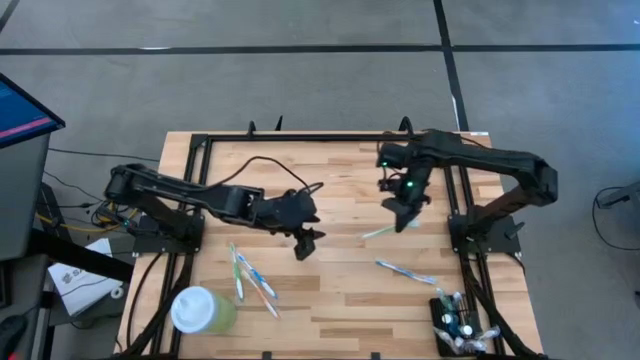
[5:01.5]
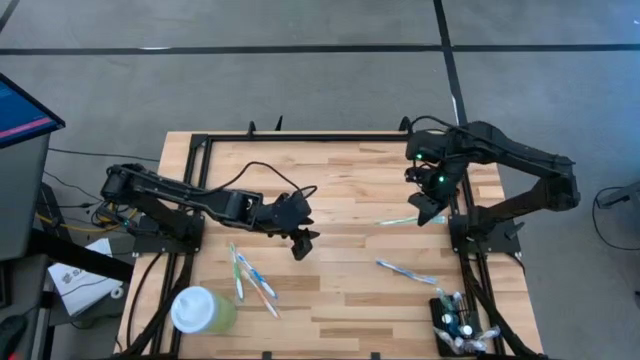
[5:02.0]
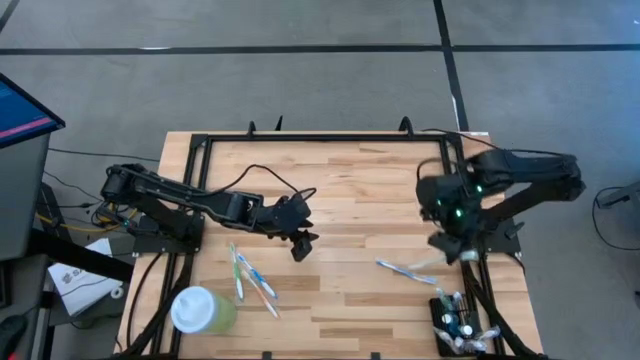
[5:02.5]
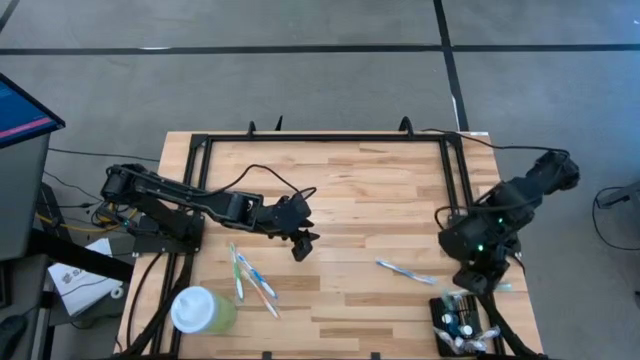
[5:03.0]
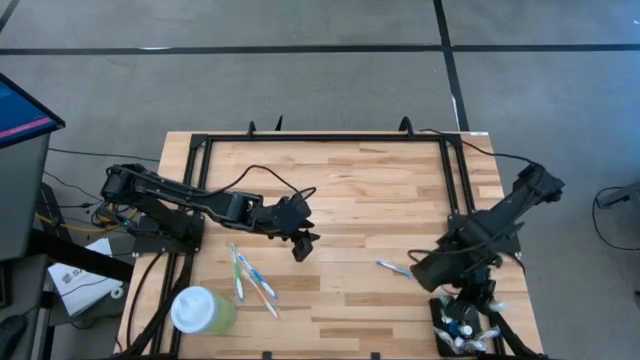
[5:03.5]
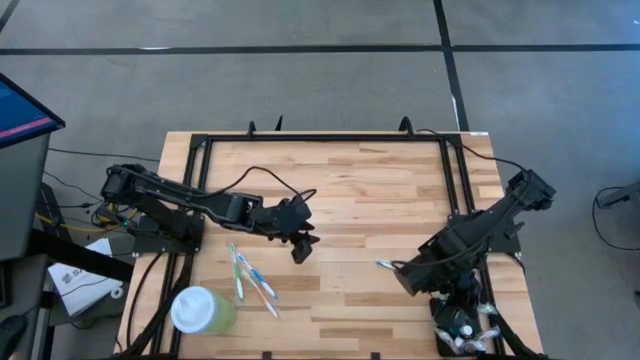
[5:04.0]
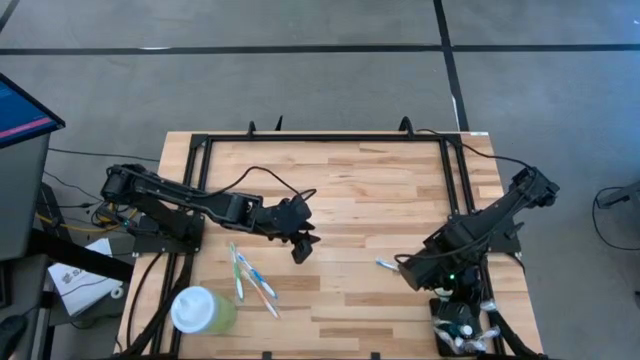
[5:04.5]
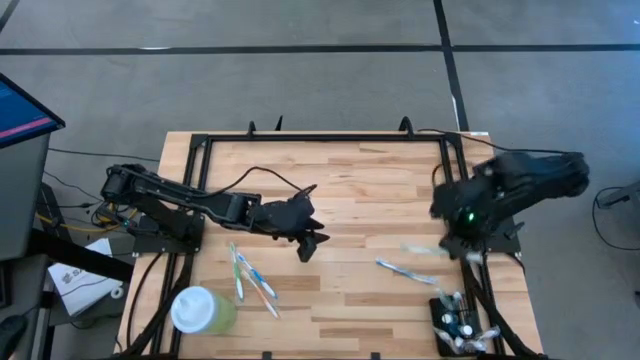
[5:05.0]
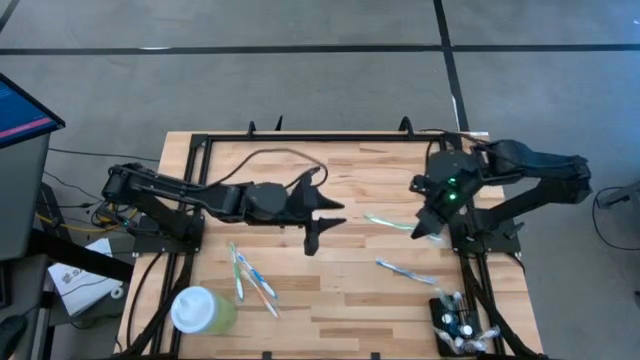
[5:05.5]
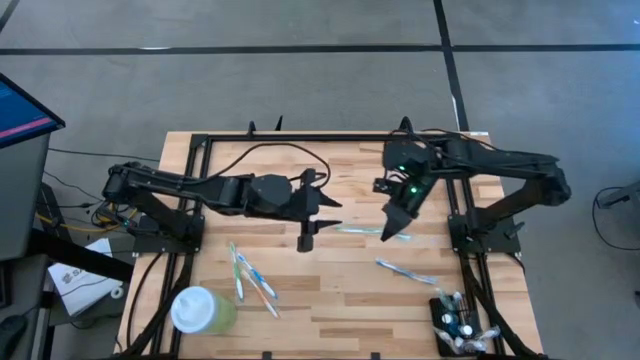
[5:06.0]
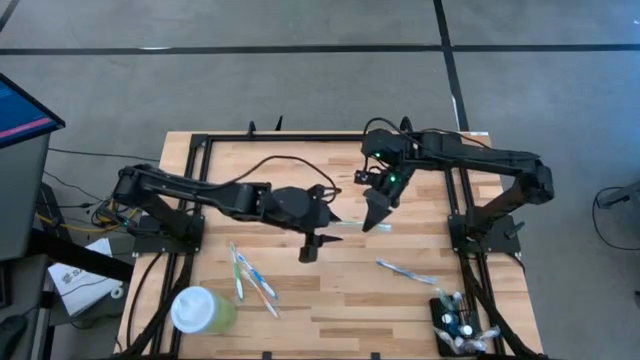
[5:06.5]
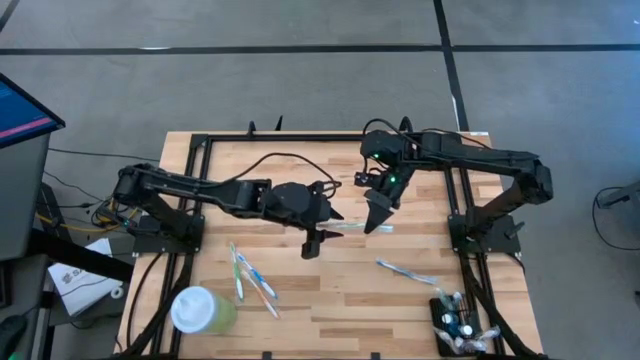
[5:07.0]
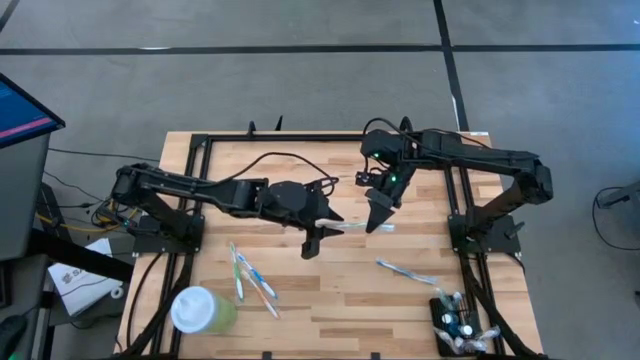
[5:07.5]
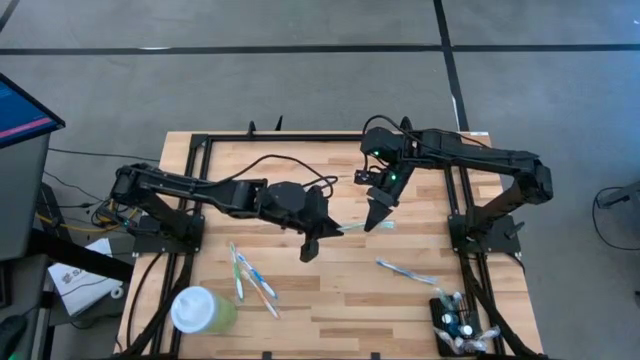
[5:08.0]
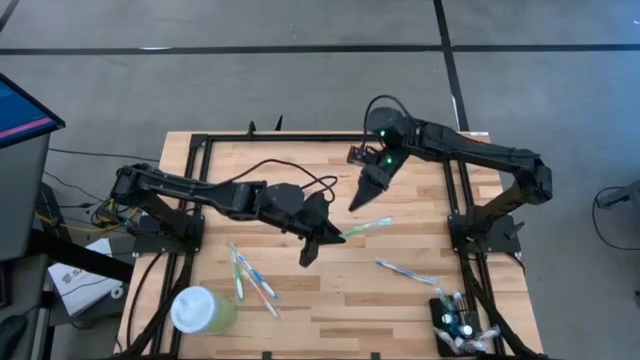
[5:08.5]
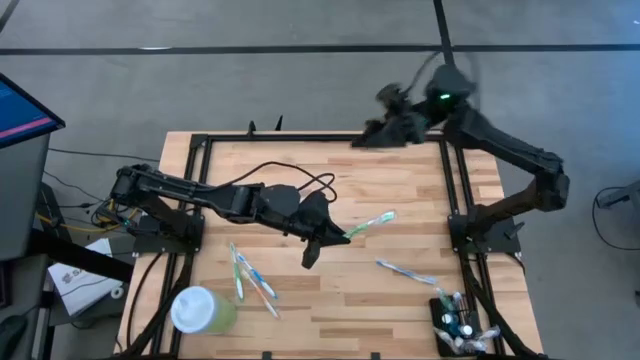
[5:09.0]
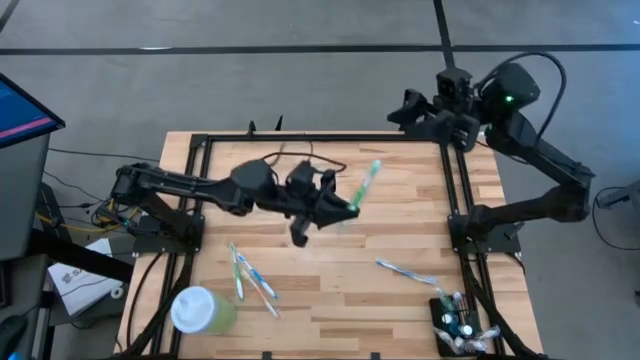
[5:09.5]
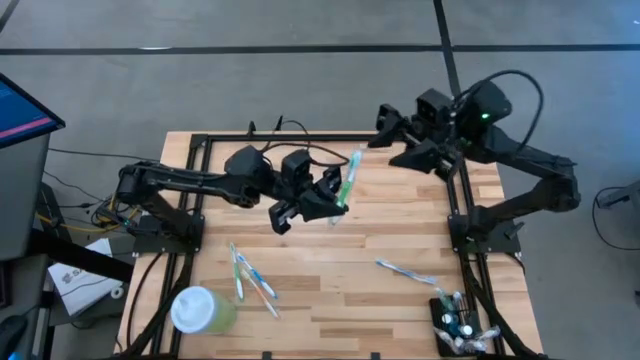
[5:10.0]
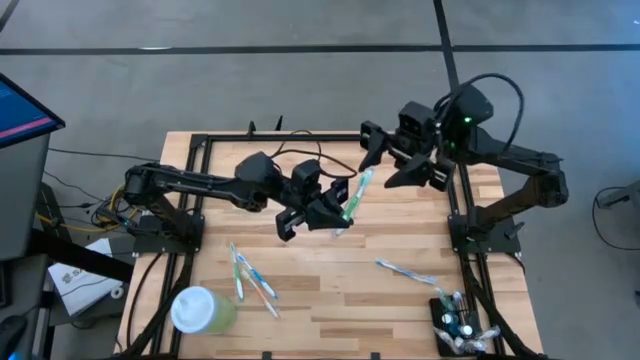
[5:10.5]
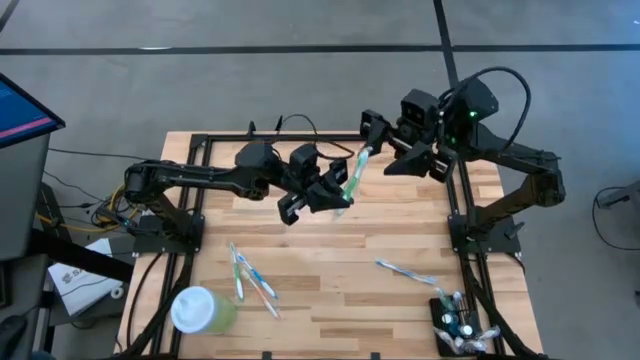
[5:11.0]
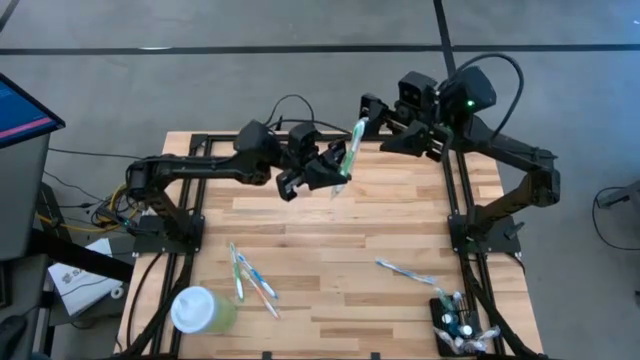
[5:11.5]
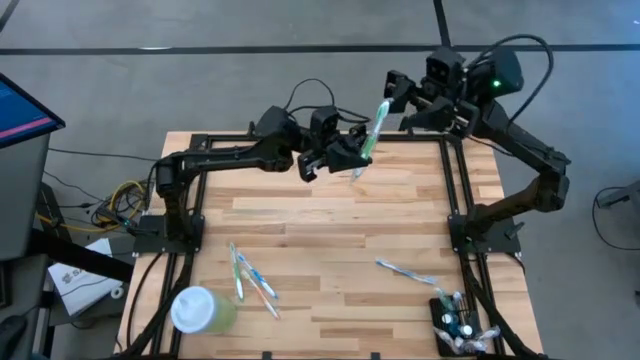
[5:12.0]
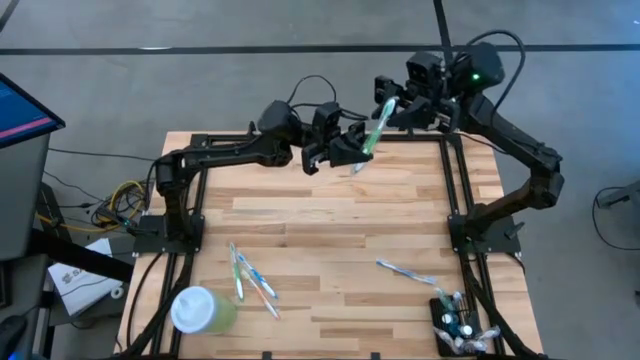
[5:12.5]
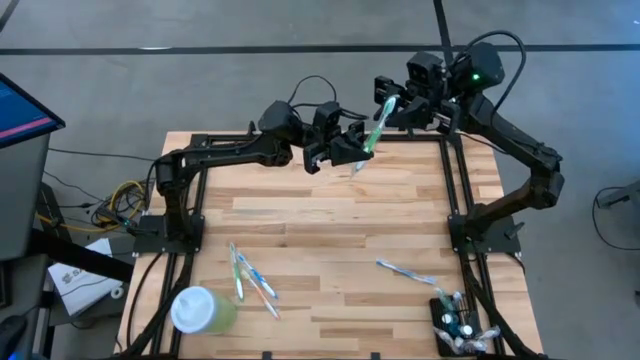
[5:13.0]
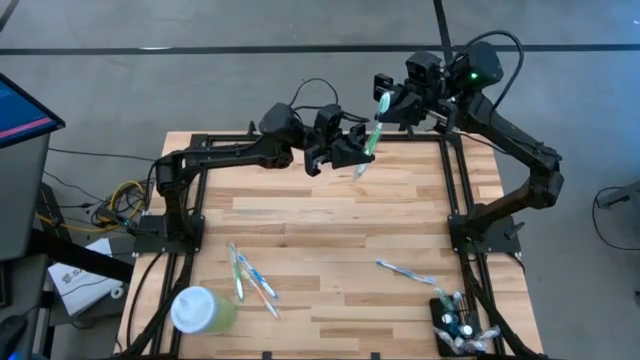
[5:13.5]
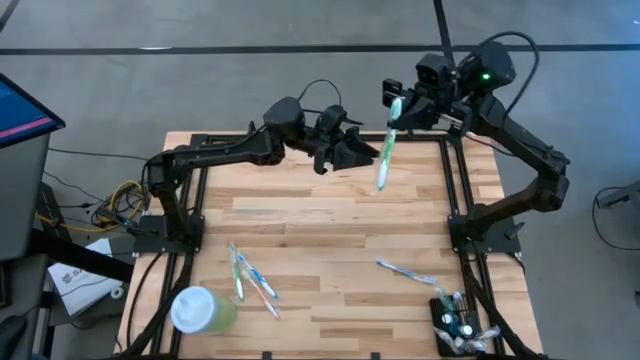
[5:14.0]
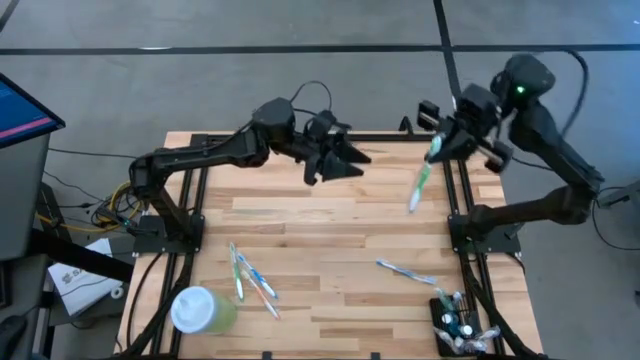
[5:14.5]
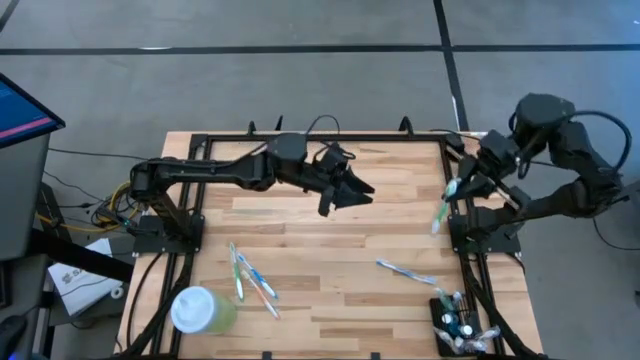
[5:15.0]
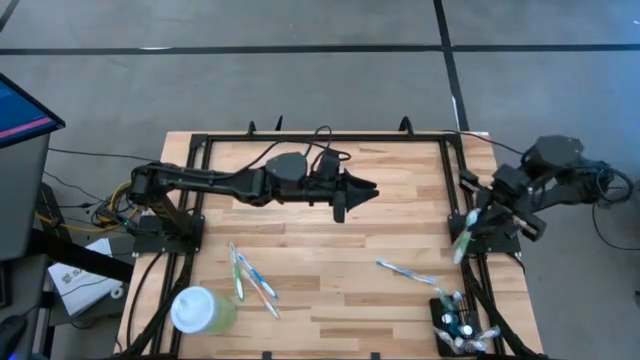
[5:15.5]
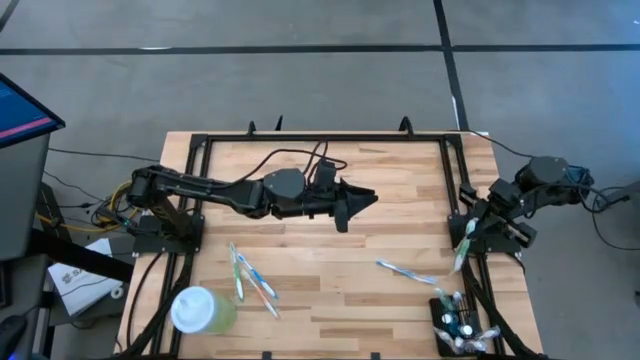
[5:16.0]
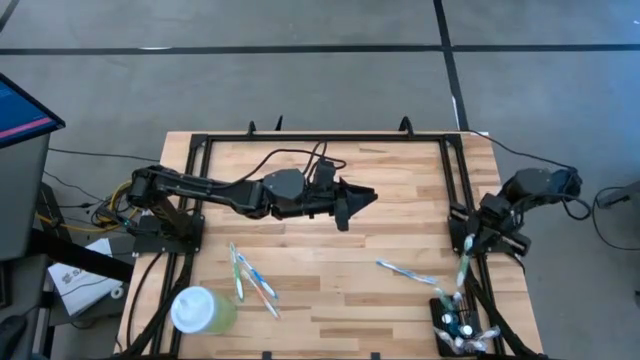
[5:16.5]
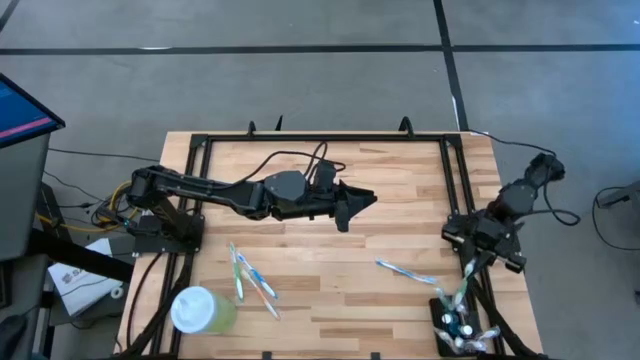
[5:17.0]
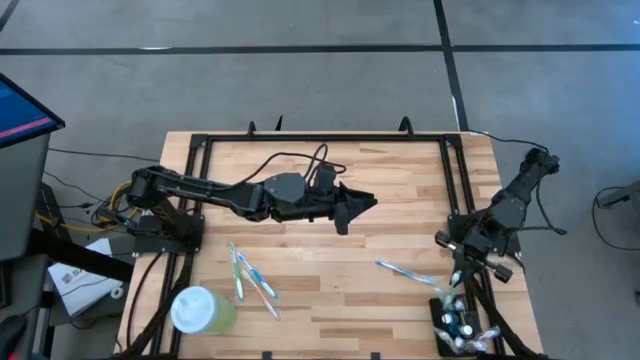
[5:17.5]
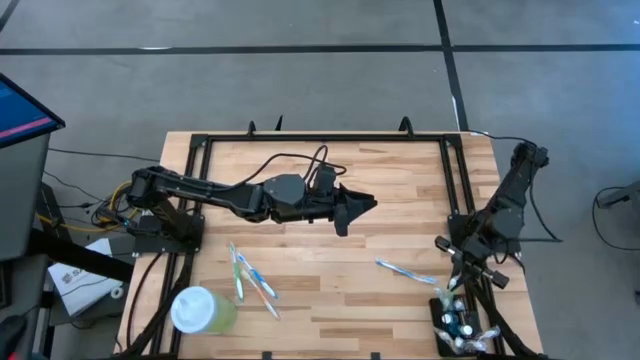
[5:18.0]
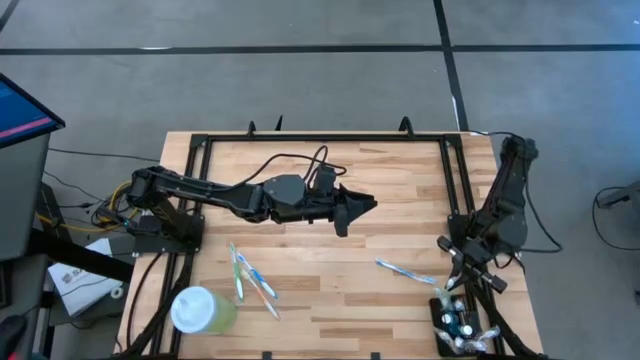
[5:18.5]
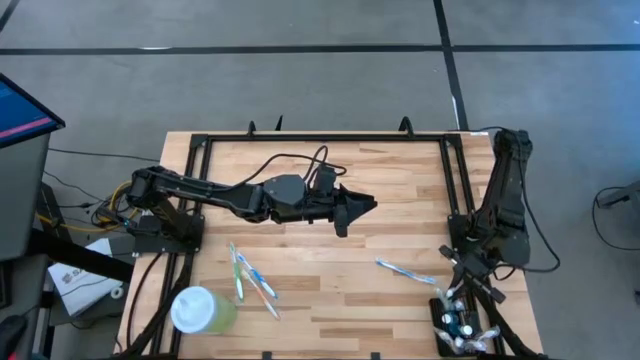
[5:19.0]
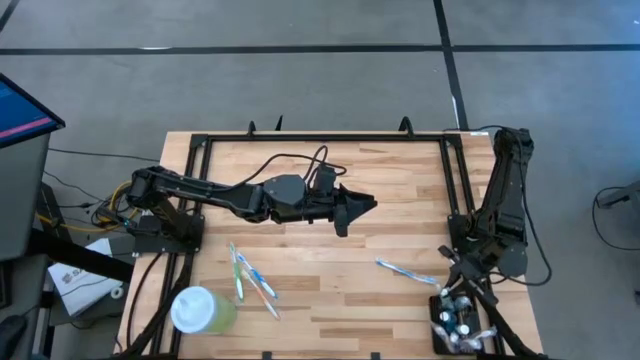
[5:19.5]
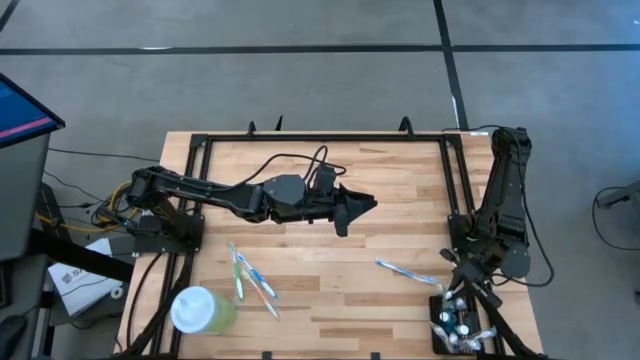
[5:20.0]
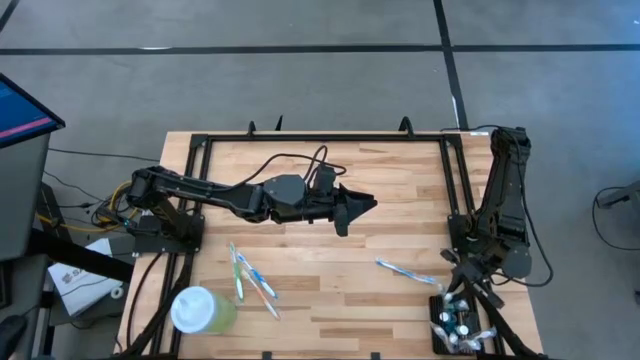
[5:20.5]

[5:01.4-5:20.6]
Task: Pick & Place toothbrushing station
Put the top green toothbrush into the black organizer

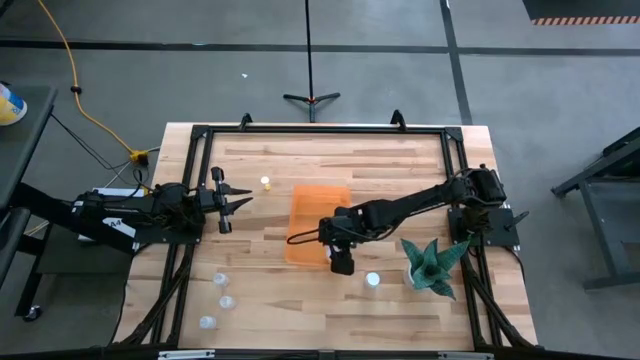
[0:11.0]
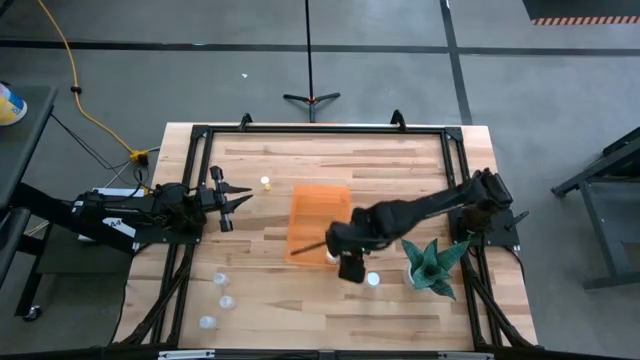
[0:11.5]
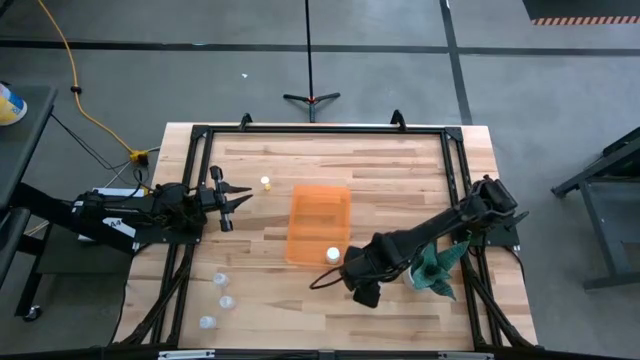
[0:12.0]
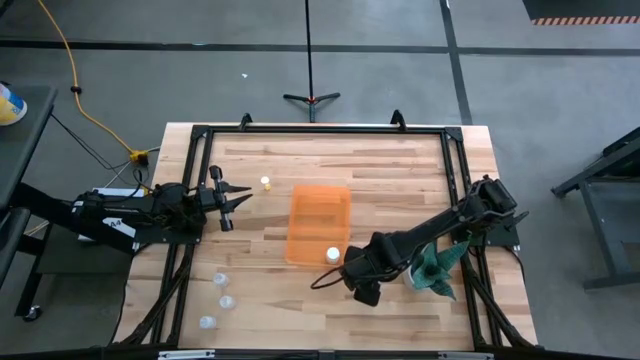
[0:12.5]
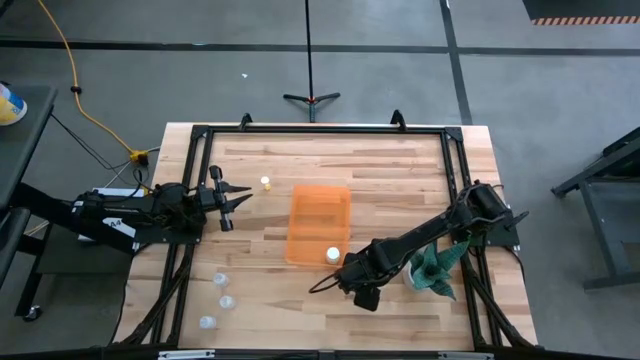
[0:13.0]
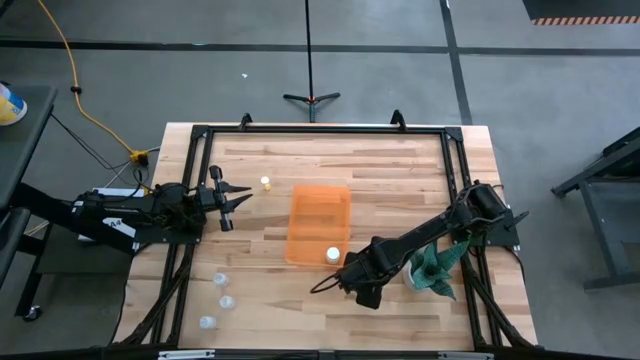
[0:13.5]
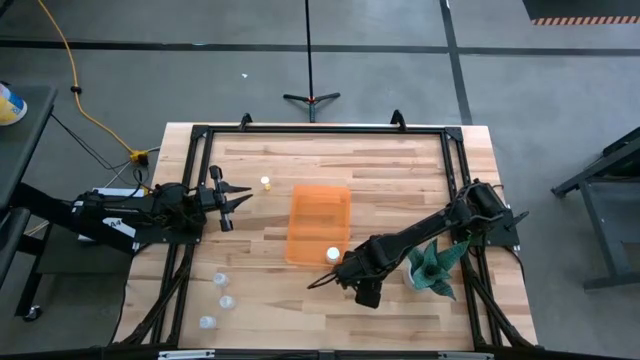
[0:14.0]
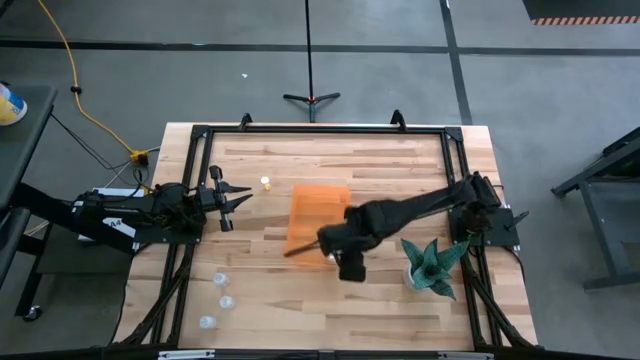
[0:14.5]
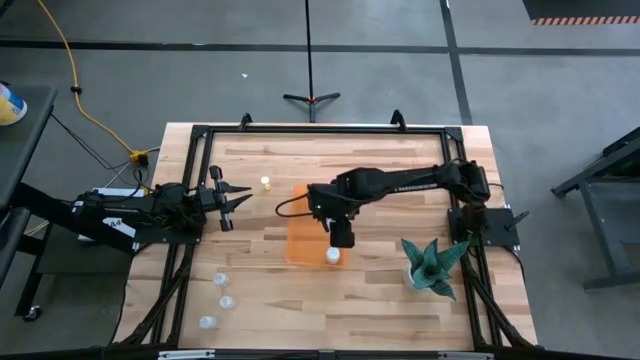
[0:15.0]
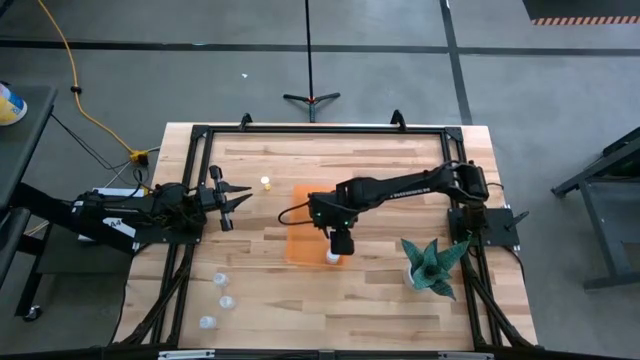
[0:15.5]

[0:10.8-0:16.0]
Task: Pick and place pill bottles into a basket
Put the white pill bottle into the orange bin
